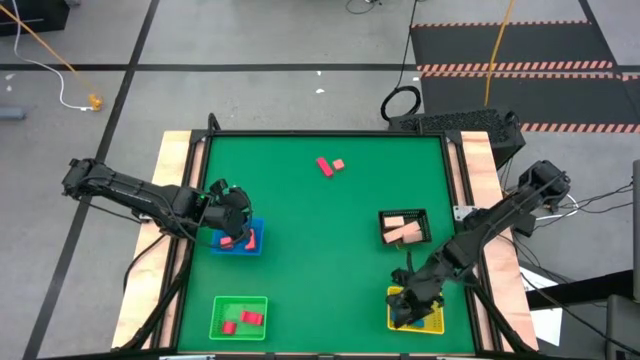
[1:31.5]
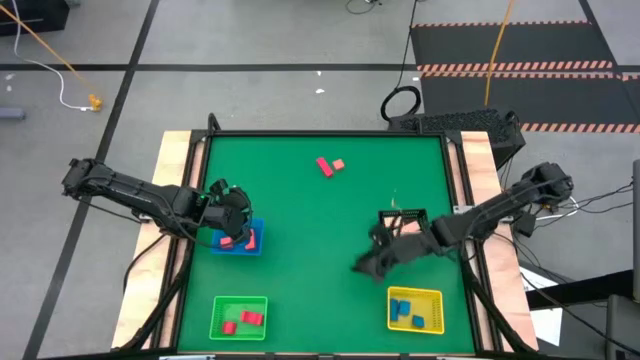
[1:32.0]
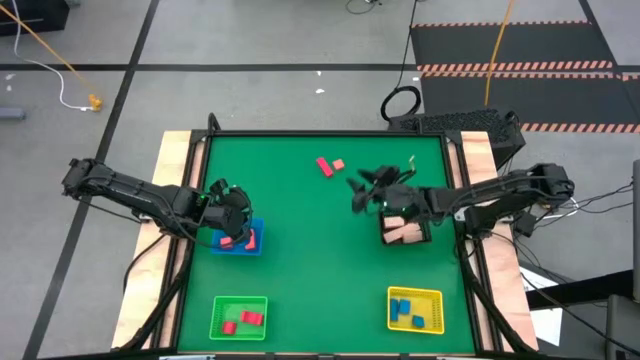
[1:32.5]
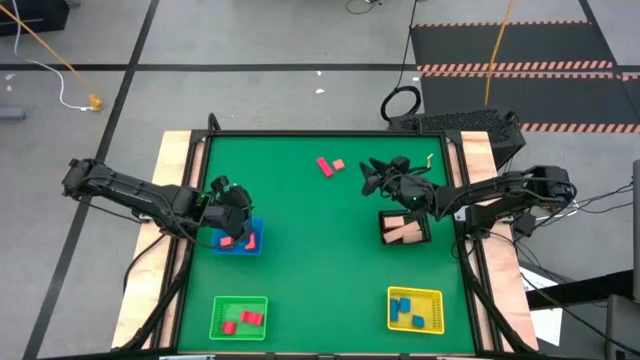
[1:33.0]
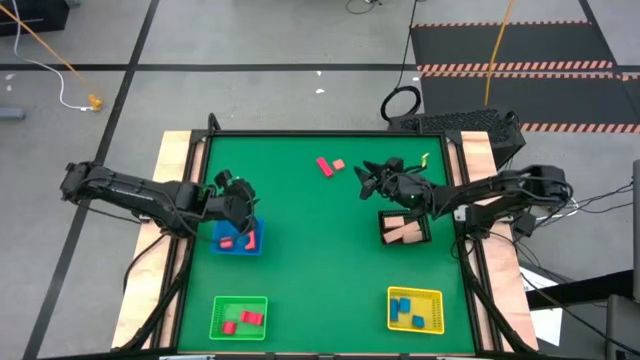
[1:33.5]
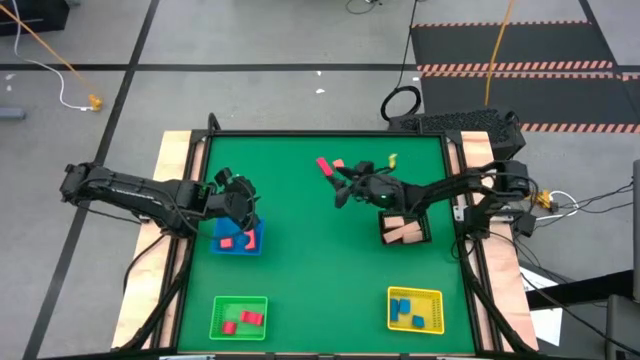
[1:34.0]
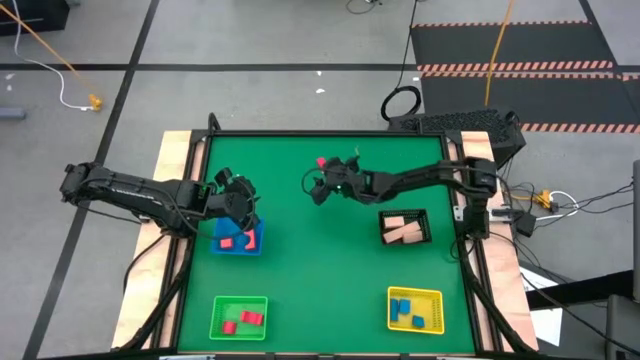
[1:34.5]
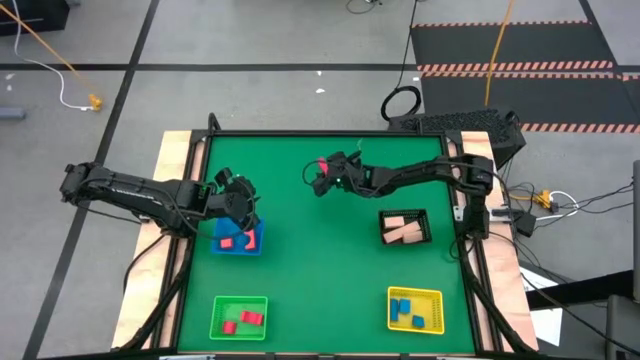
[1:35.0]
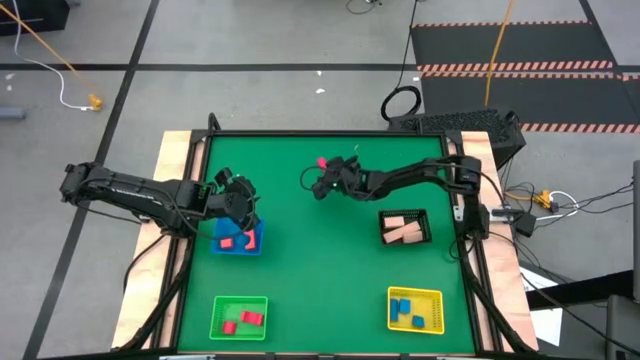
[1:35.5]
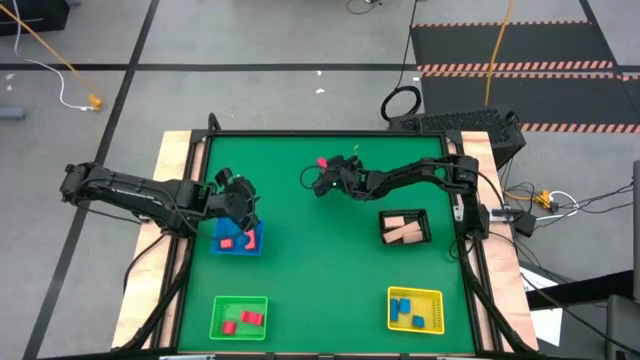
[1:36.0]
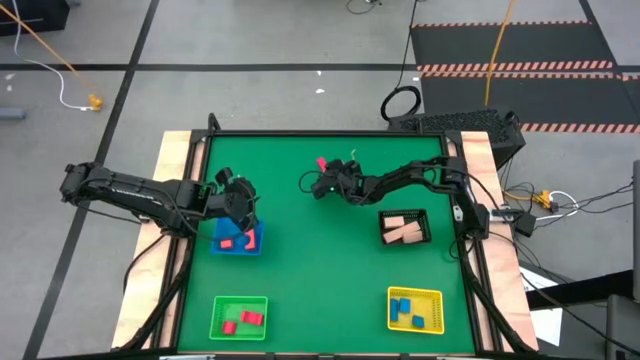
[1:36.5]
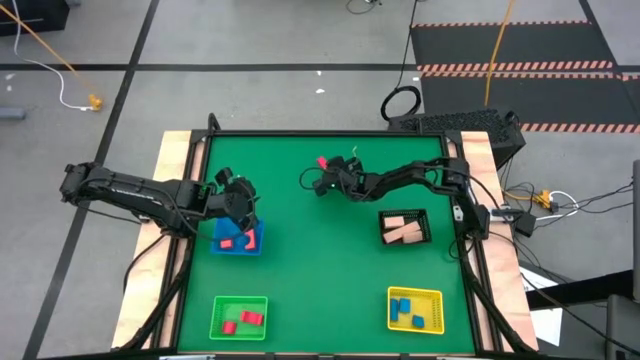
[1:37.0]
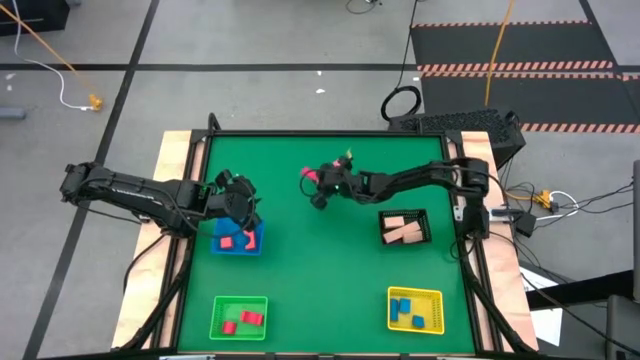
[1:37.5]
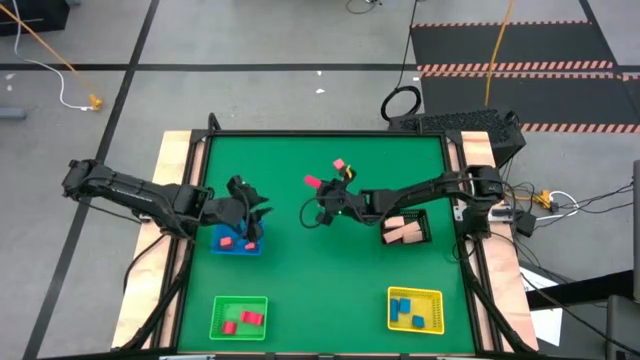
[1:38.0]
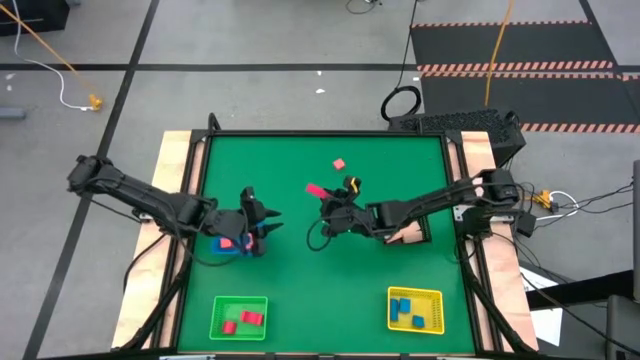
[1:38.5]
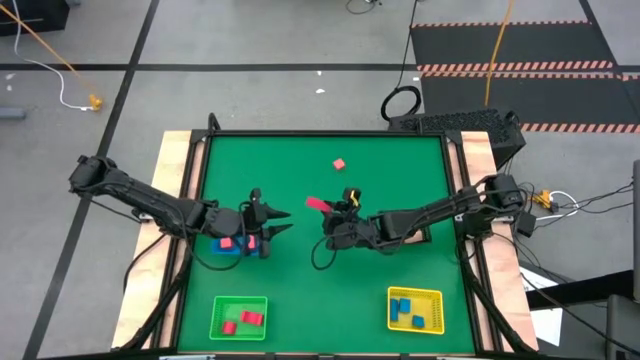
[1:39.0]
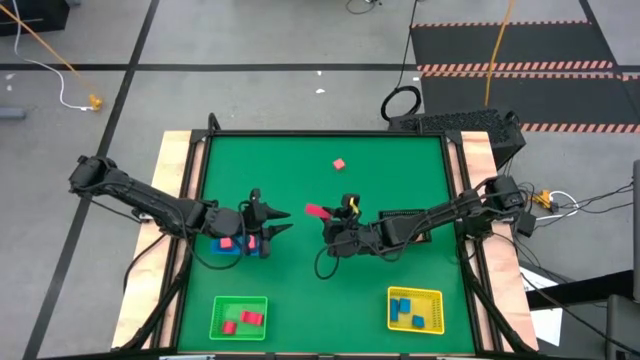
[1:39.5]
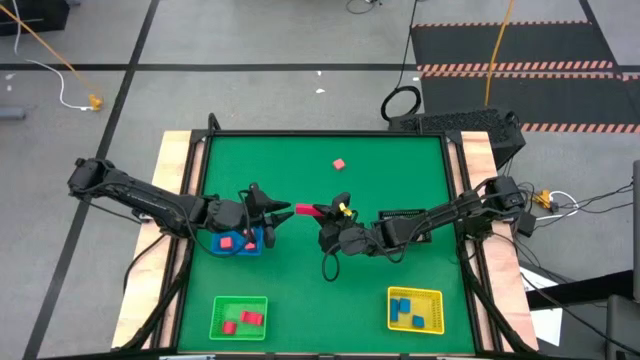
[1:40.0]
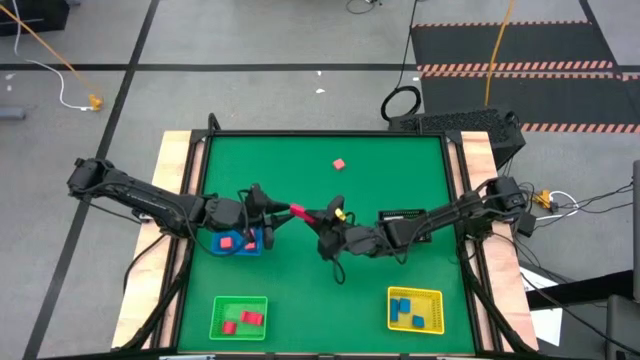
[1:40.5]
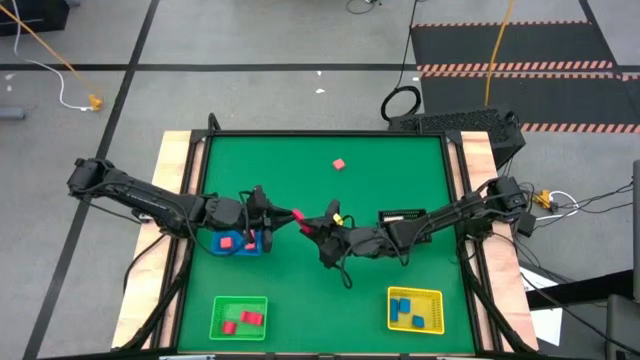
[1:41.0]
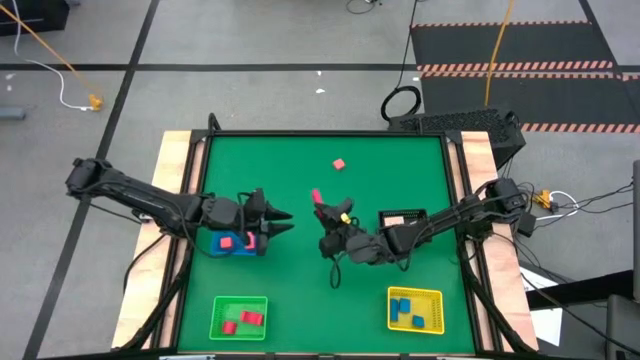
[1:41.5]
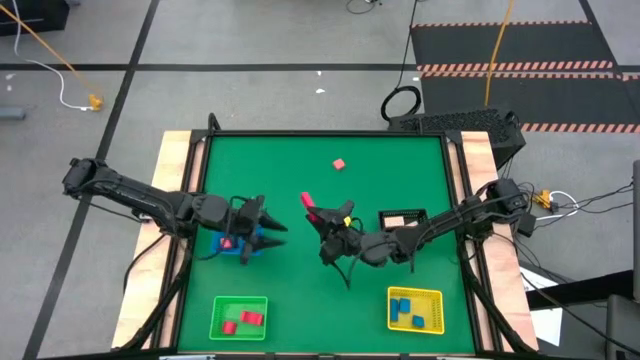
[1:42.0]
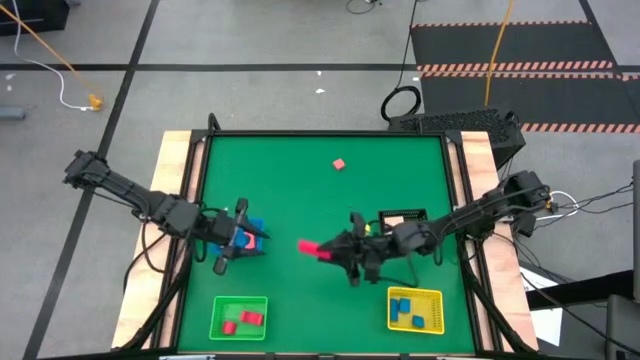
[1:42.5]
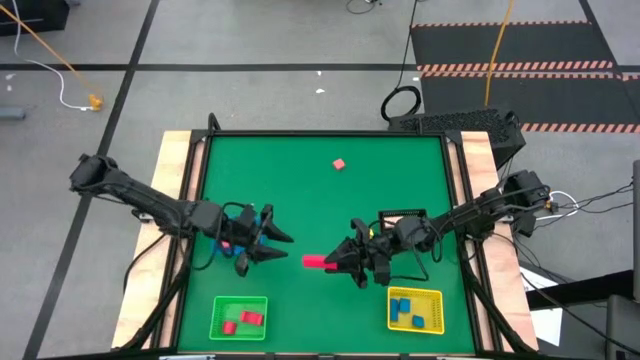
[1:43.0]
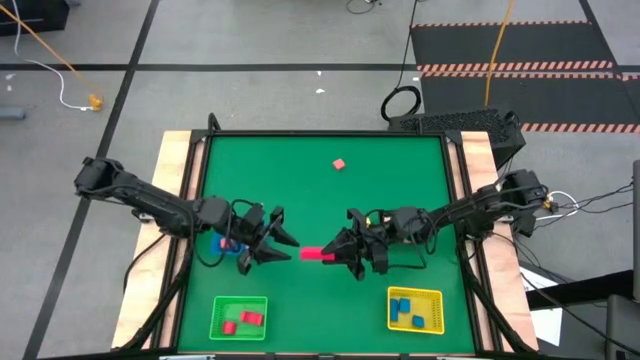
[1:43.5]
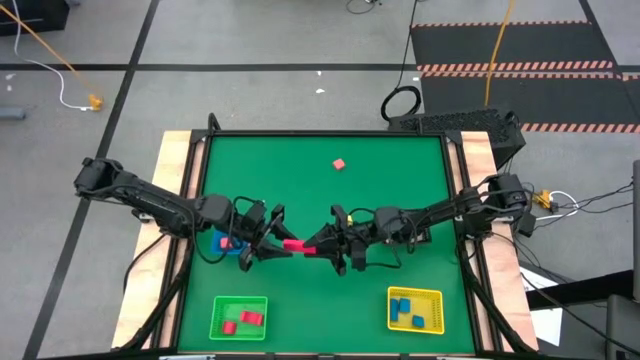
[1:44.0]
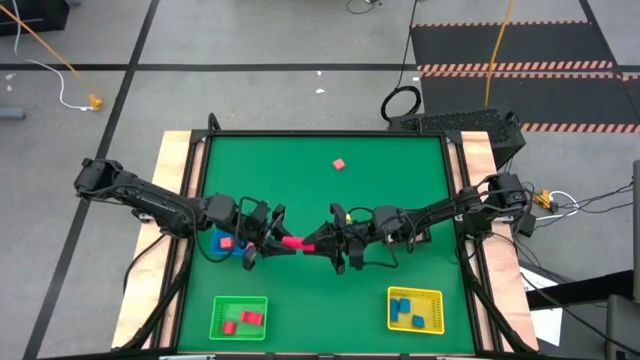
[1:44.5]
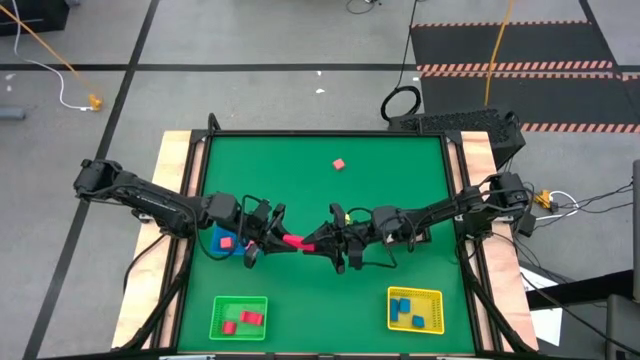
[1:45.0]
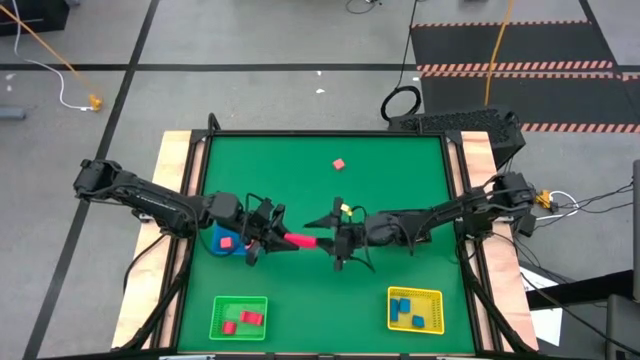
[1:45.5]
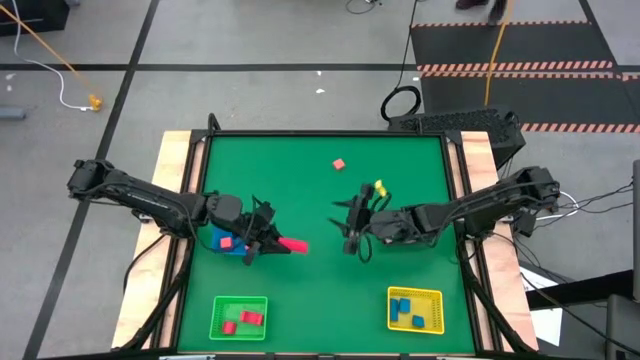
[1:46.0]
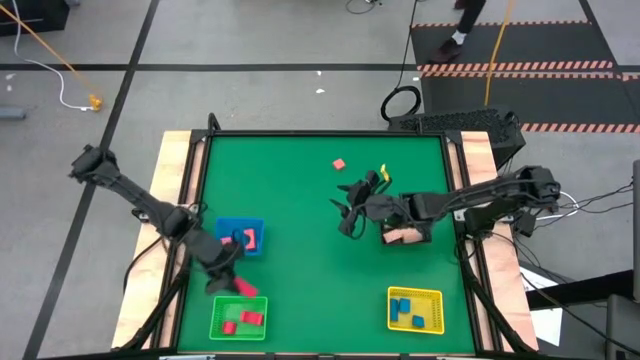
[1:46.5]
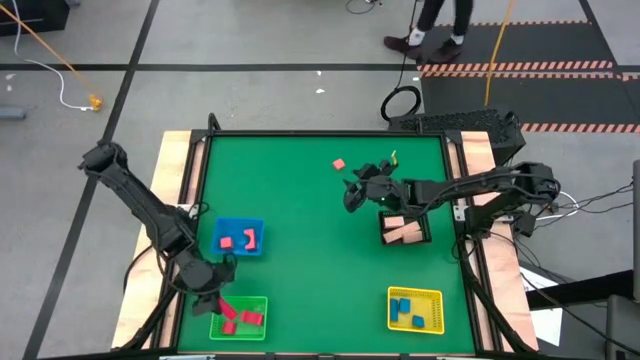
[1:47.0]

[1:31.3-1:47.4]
Task: Sort & place blocks by color
Put the red block into the green bin

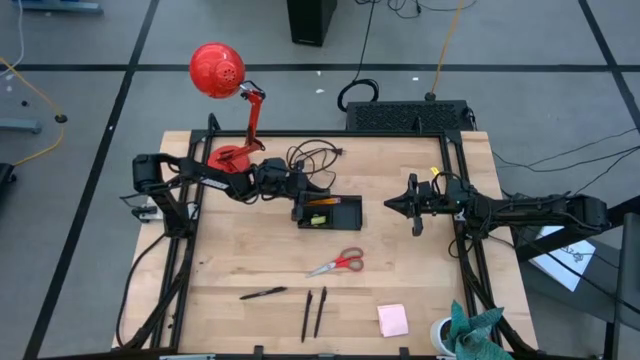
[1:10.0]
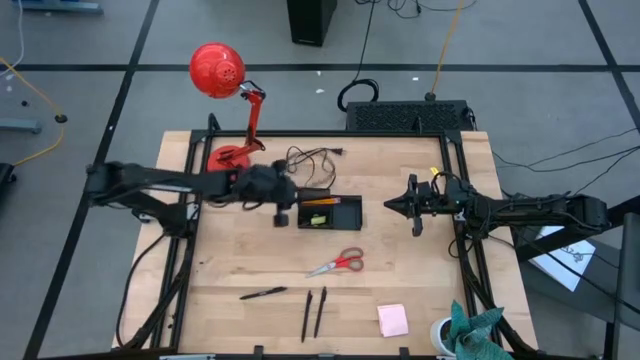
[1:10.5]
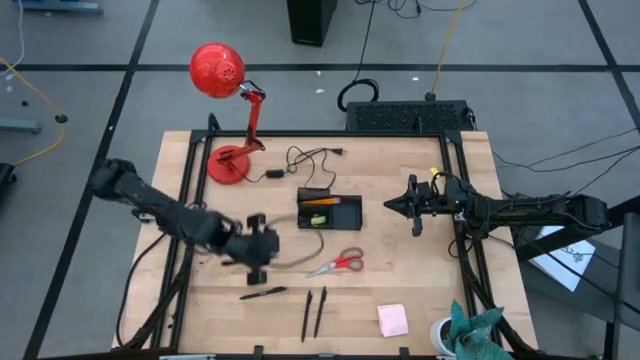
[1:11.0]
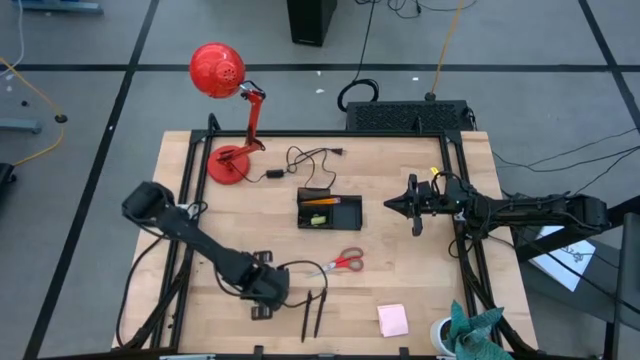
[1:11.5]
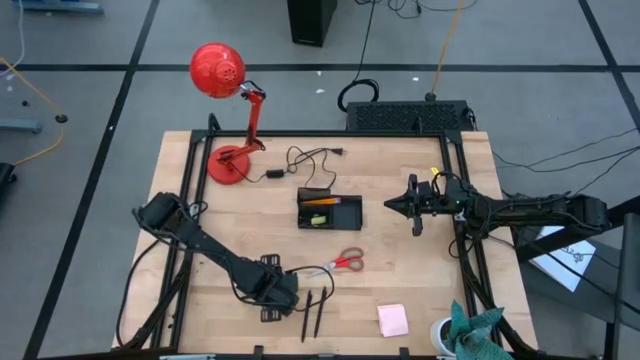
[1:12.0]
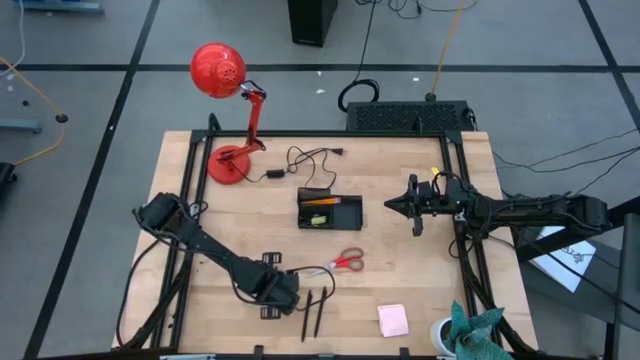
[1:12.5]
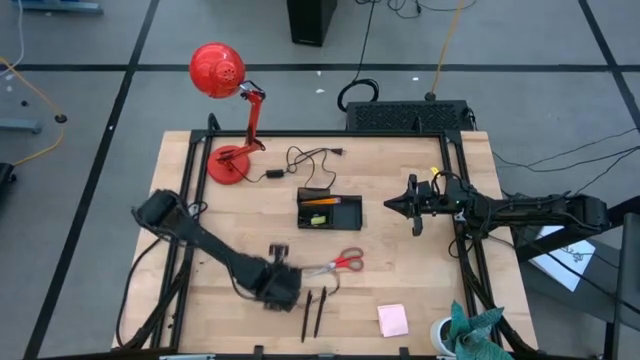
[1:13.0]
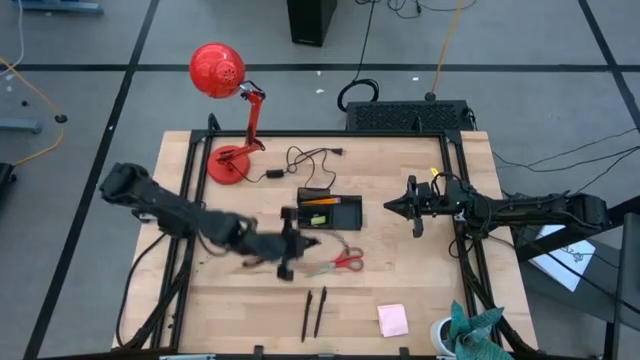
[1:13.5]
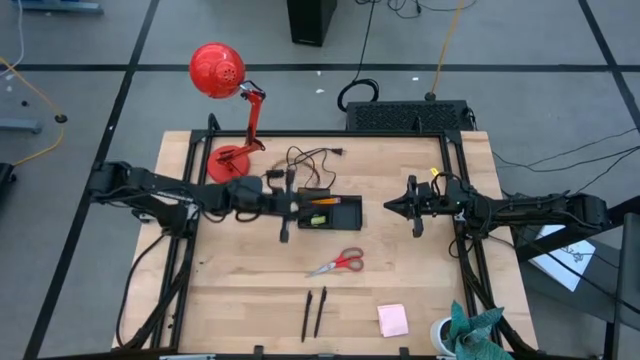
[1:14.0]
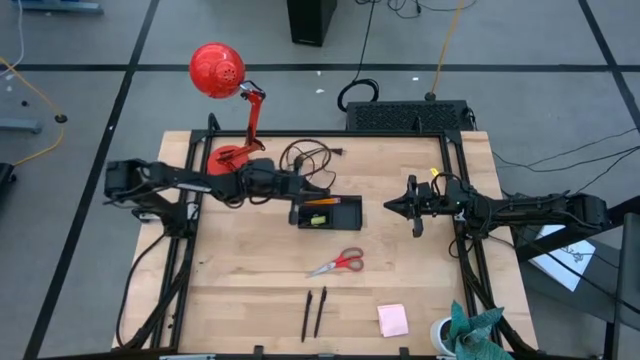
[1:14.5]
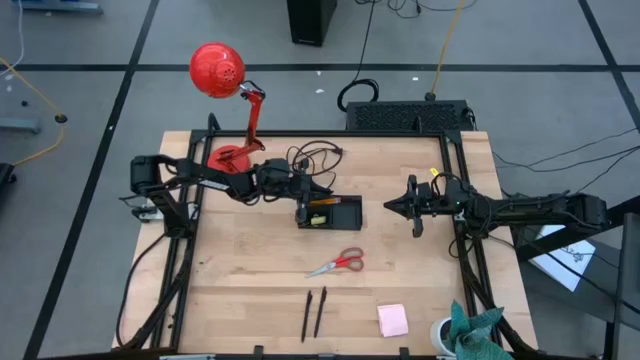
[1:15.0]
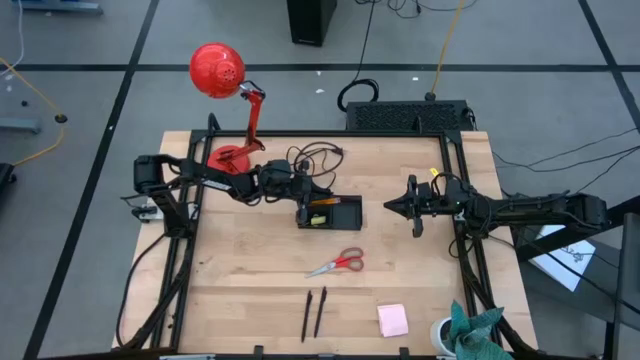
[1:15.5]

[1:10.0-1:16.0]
Task: Pick and place office supplies into organizer
Put the black ballpen into the black desk organizer
